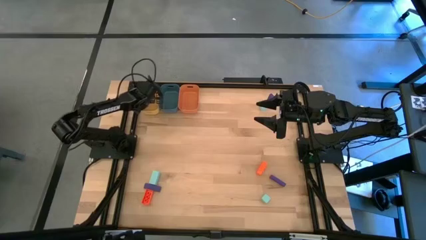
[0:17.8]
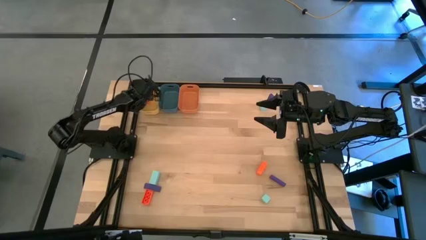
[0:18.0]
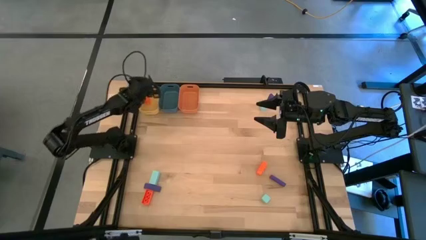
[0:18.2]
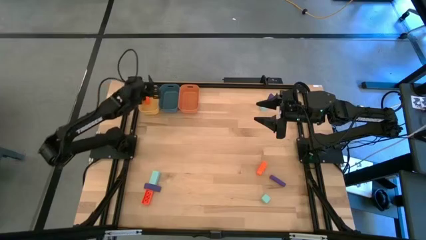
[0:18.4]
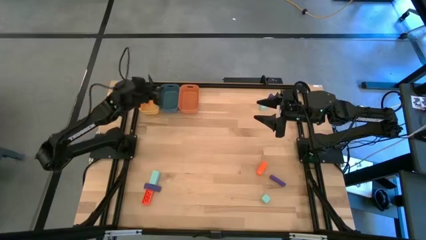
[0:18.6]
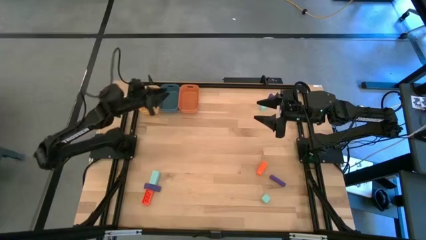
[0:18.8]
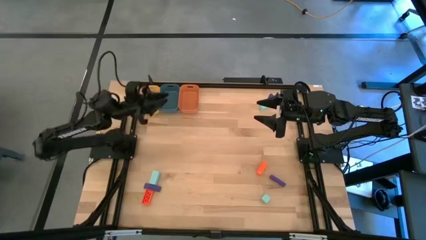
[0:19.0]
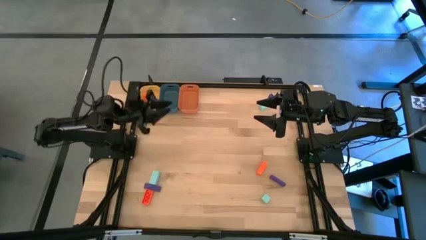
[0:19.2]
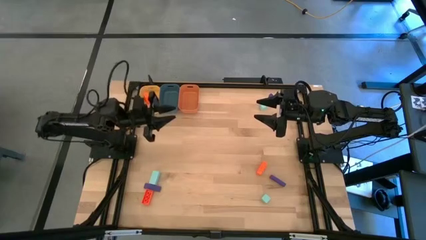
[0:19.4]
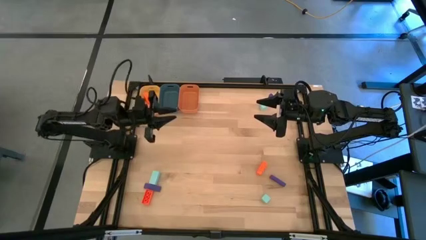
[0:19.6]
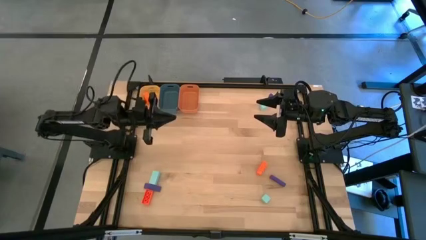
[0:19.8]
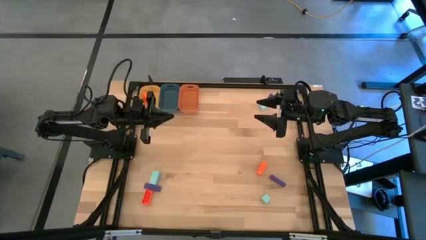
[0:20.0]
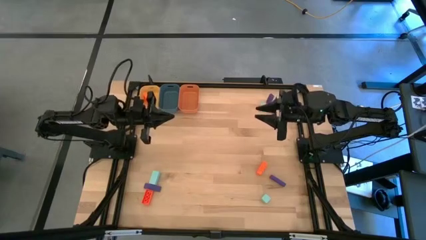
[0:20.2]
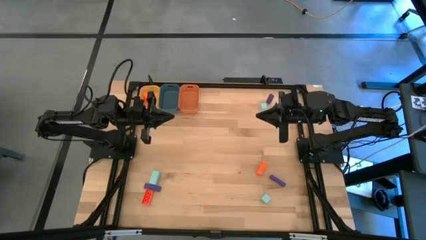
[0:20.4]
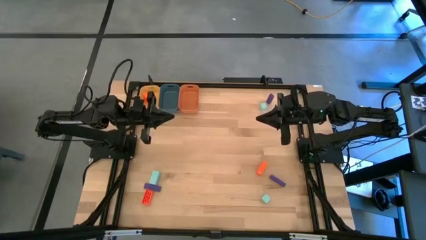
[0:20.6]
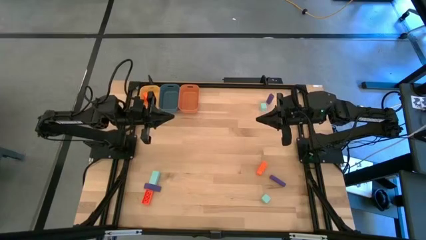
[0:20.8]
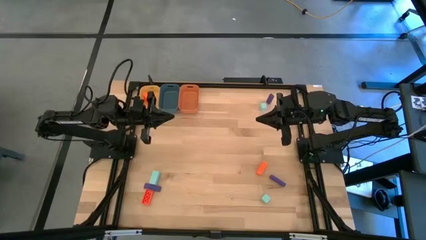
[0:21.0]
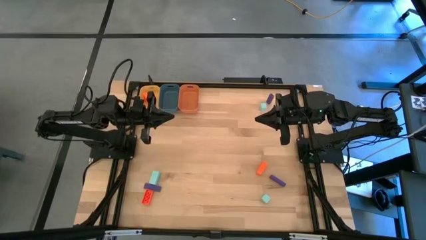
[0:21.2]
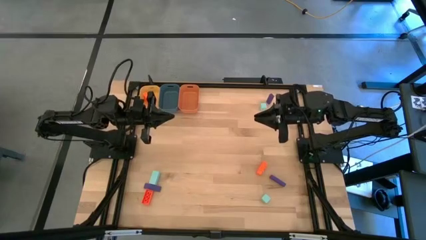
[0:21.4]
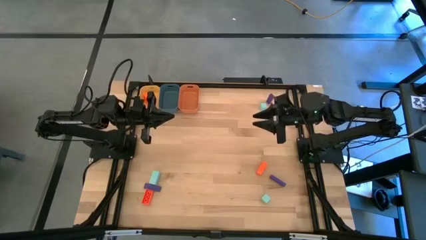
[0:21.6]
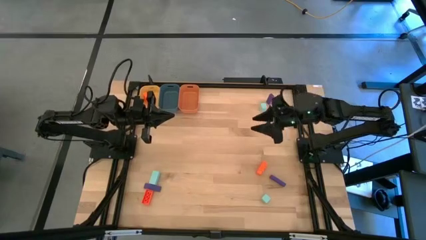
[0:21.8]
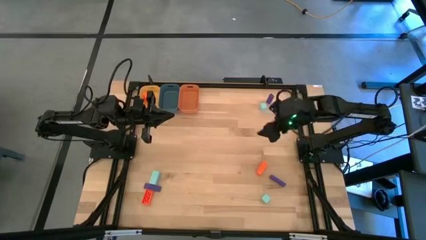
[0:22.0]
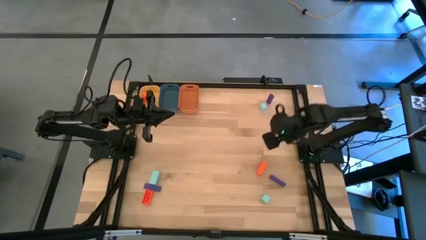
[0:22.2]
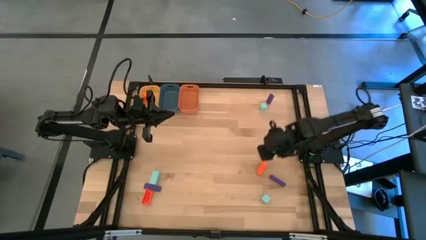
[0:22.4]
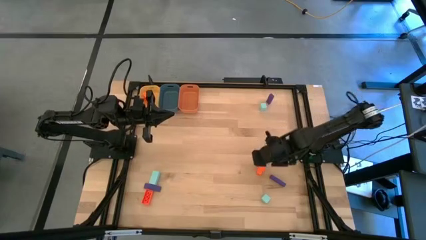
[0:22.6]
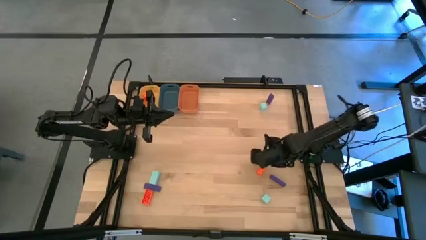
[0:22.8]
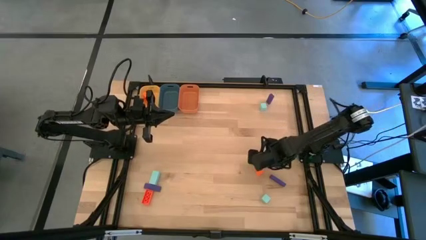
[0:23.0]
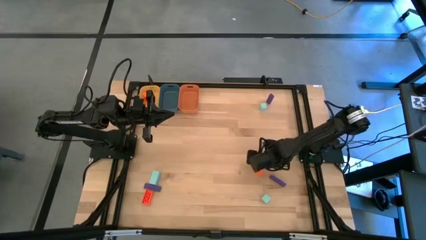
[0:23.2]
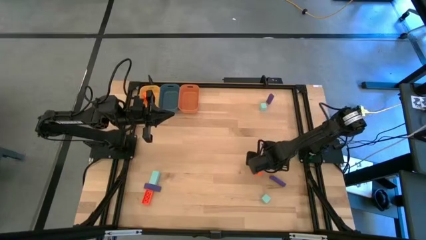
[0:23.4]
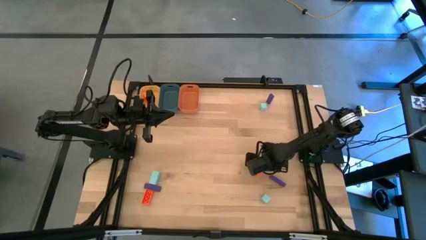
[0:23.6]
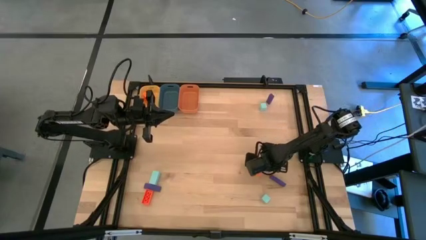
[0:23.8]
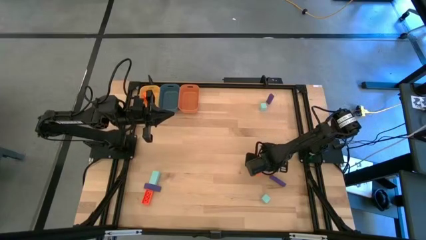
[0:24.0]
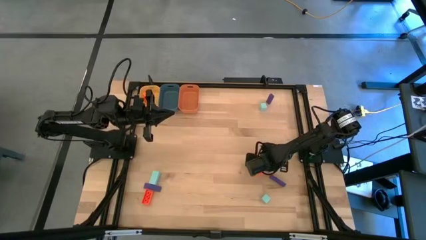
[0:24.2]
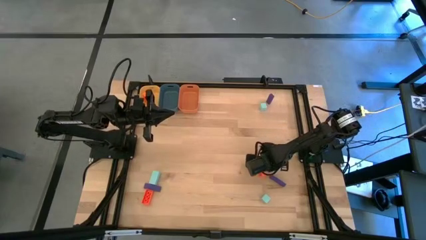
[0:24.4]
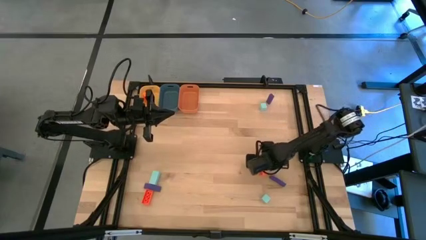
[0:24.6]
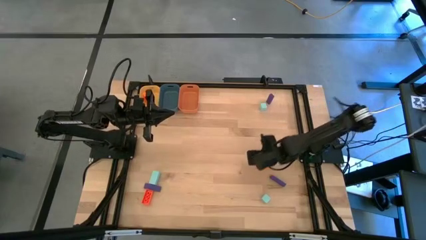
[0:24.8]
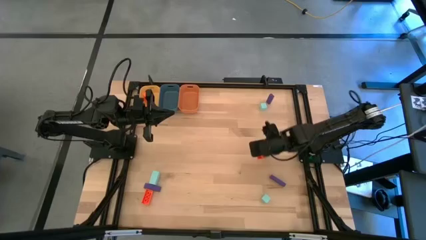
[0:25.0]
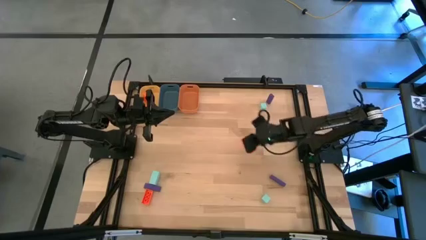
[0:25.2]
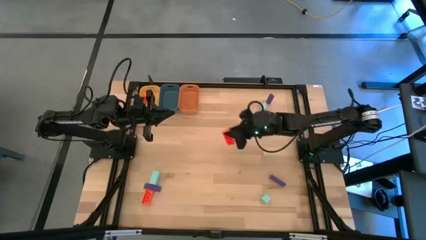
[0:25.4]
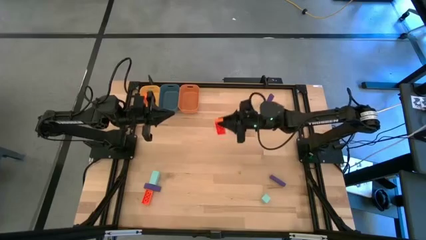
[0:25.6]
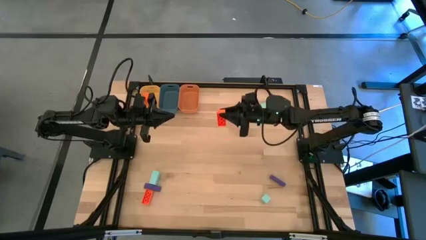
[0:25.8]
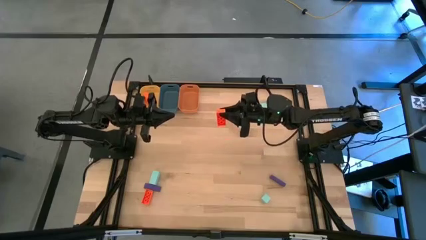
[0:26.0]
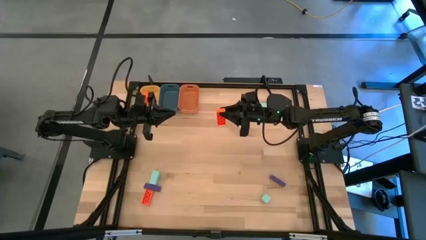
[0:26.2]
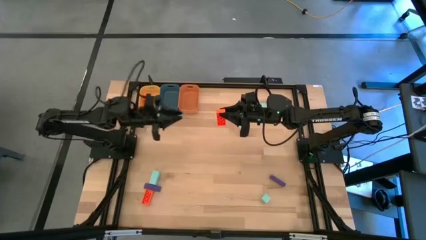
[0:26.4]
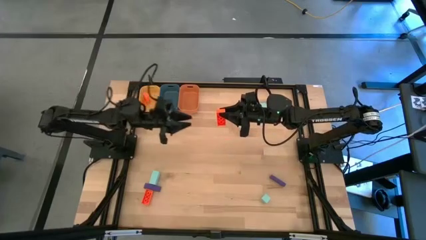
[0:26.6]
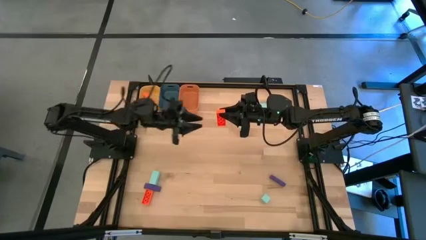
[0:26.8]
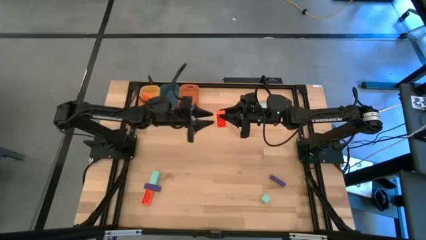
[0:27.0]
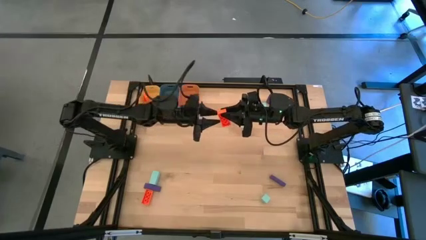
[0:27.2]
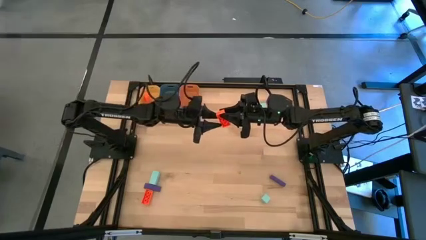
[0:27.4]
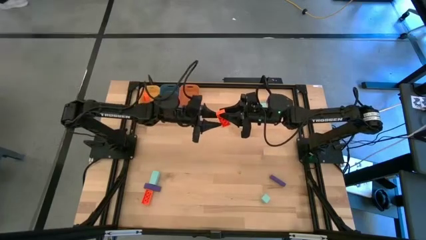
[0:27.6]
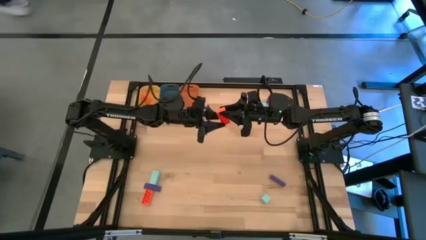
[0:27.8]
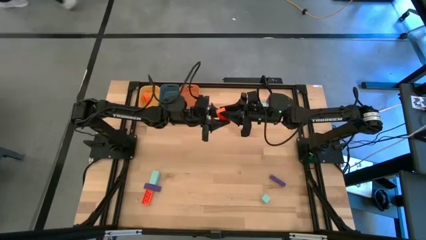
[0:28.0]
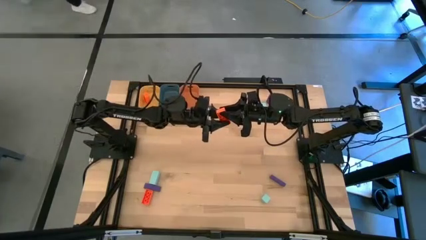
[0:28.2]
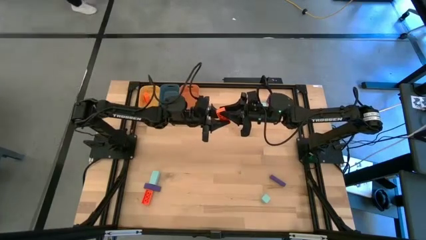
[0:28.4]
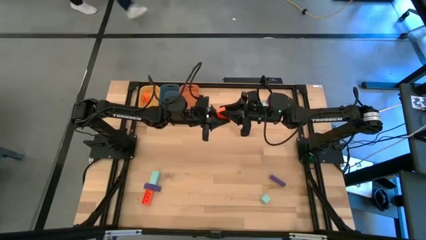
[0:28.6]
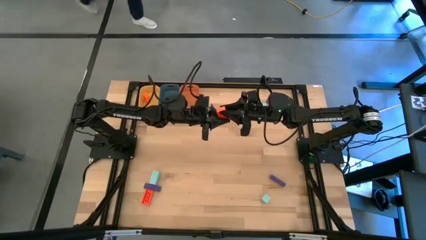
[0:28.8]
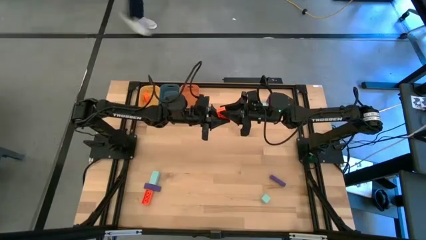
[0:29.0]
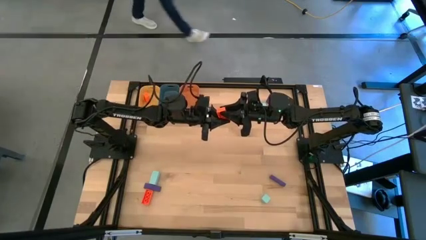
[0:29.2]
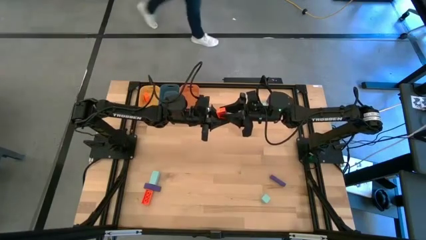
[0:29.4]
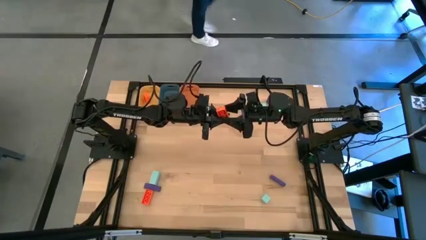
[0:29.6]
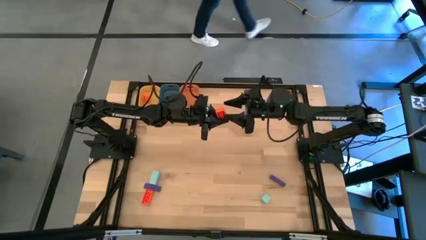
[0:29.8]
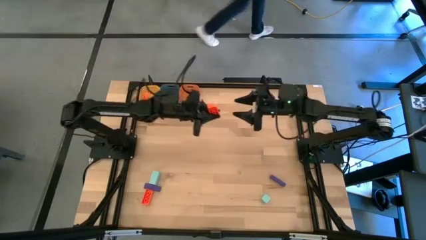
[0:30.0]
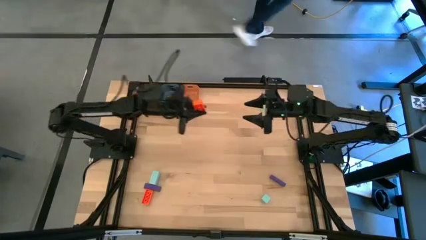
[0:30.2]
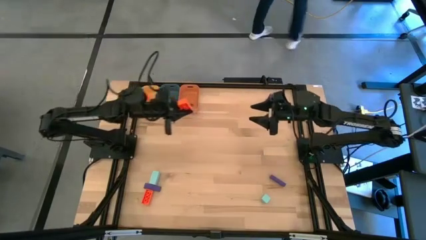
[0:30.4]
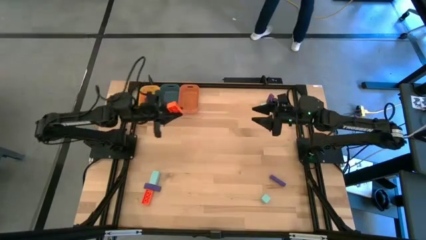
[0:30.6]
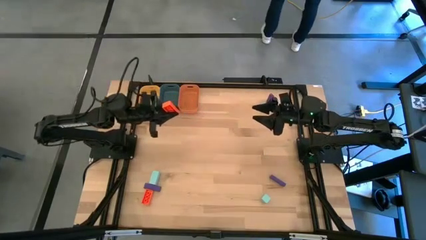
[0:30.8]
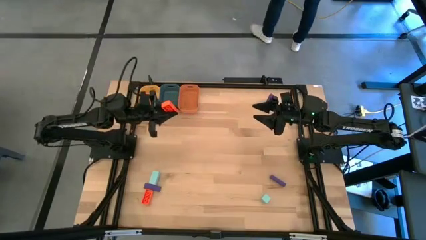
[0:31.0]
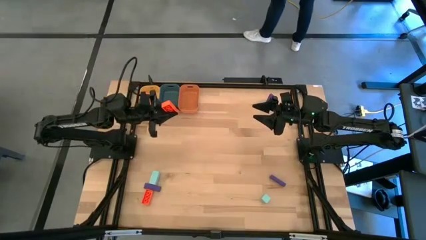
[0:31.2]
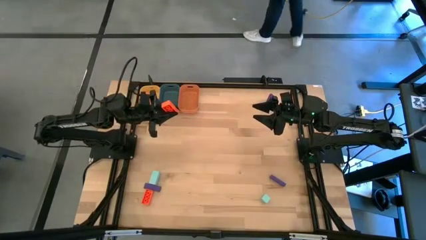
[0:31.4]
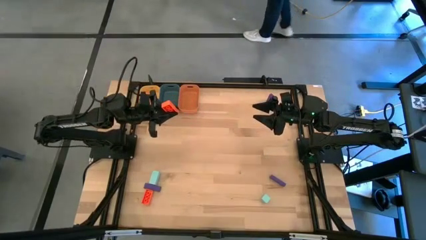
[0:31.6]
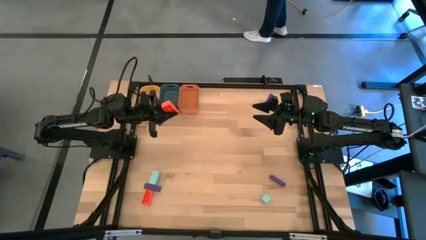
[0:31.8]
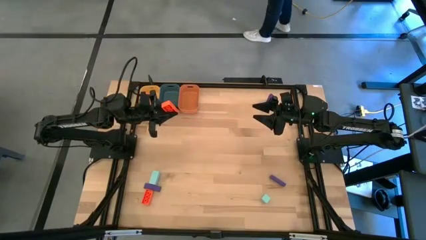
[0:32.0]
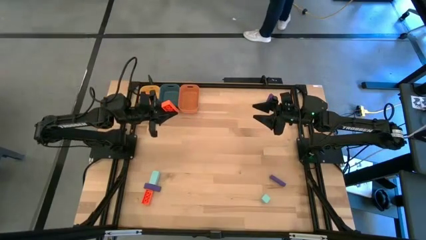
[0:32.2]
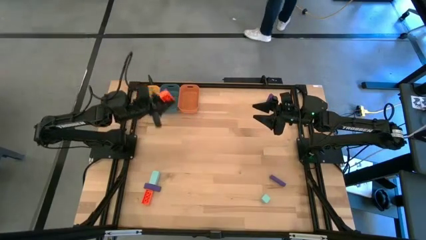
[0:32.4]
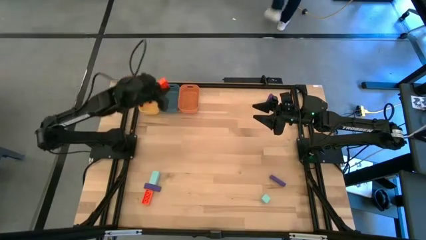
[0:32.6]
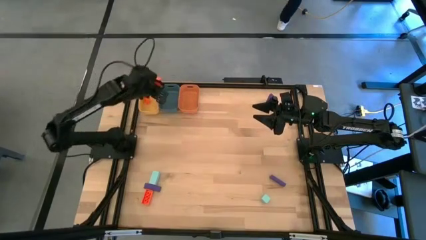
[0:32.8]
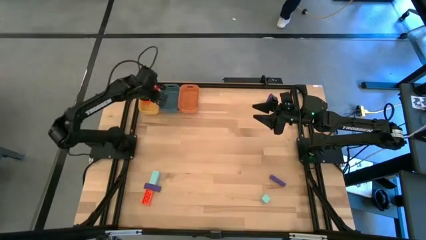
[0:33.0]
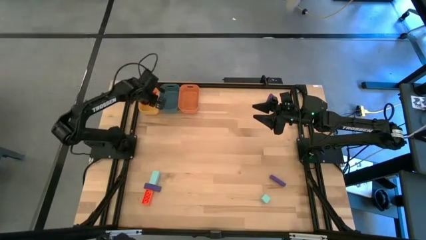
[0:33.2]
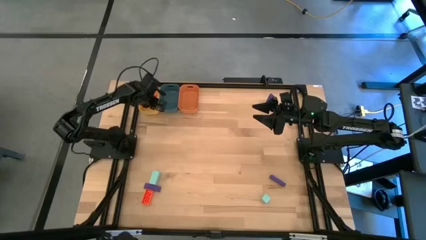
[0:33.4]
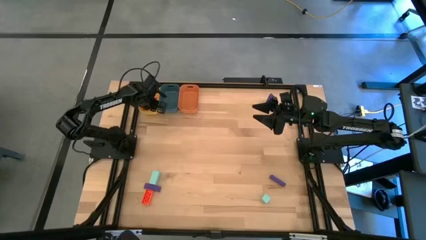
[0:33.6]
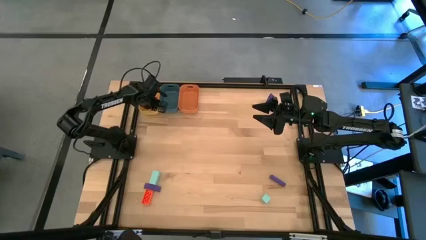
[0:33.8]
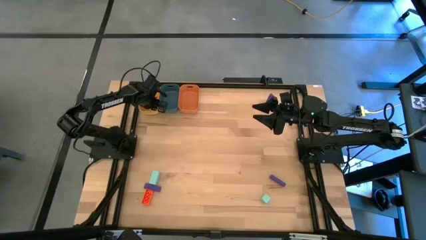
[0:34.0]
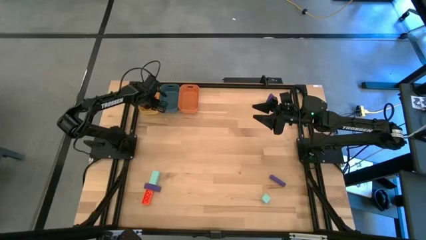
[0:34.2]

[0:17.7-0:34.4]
Task: Sort & place blocks by color
Put the right orange game piece into the yellow bin
